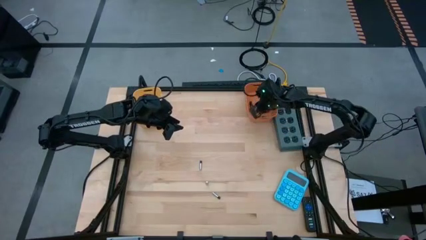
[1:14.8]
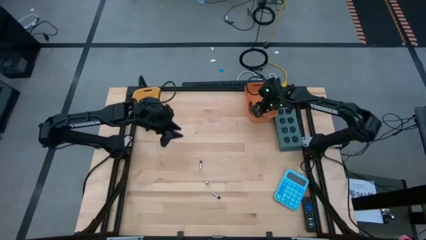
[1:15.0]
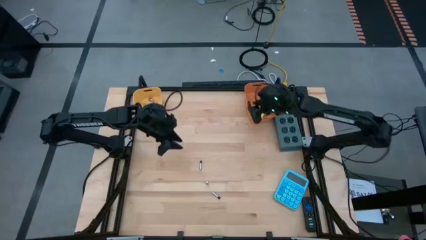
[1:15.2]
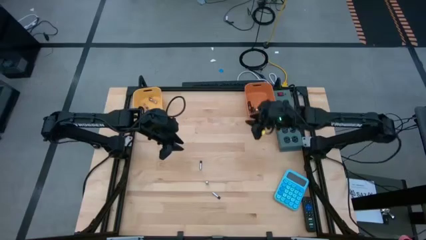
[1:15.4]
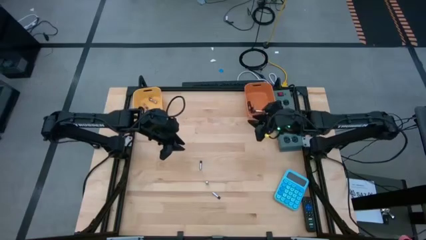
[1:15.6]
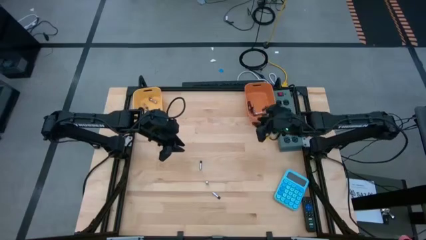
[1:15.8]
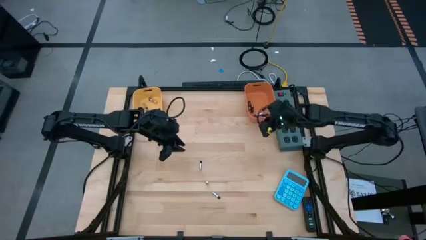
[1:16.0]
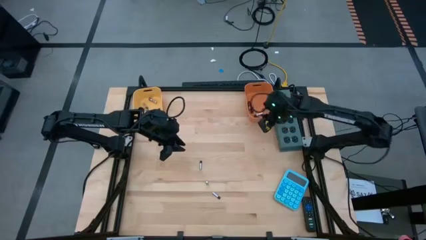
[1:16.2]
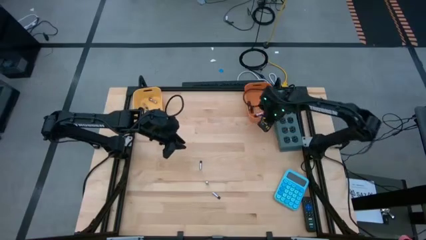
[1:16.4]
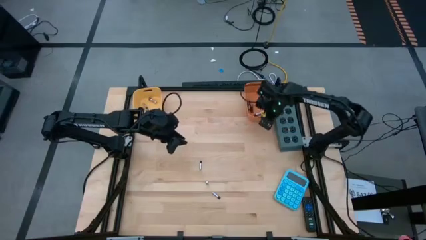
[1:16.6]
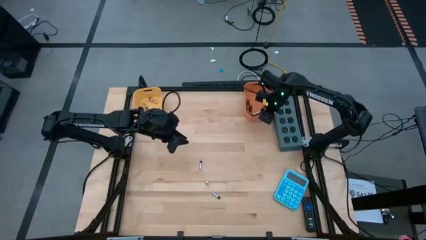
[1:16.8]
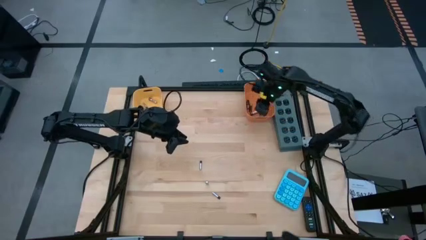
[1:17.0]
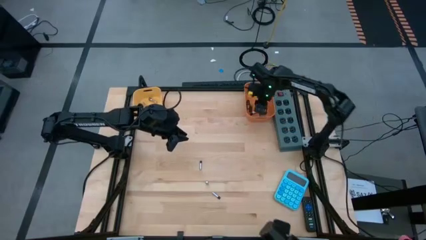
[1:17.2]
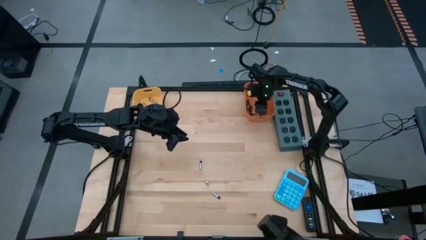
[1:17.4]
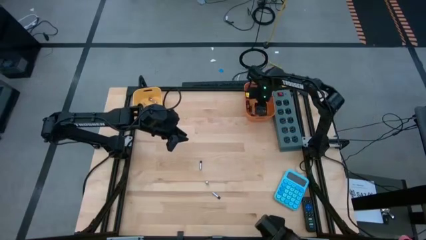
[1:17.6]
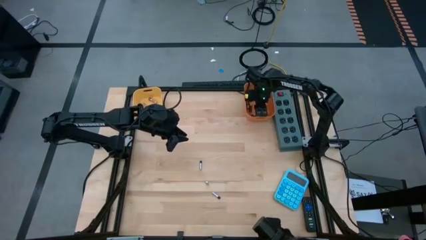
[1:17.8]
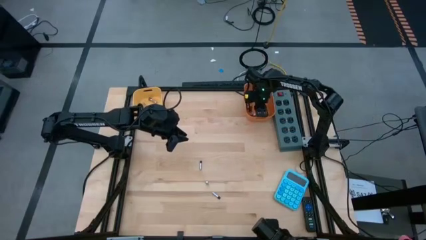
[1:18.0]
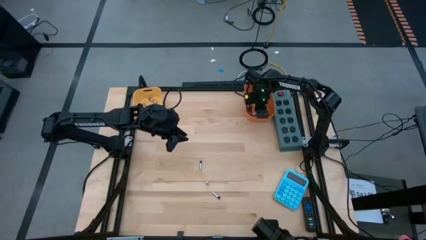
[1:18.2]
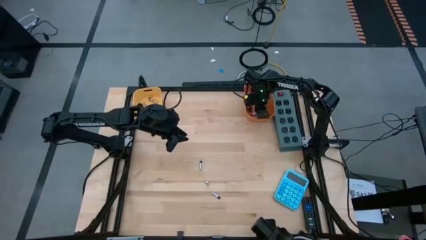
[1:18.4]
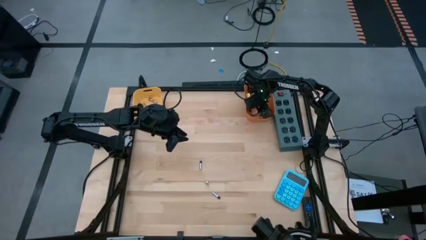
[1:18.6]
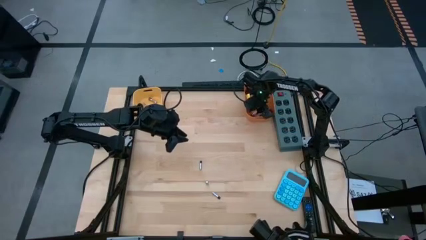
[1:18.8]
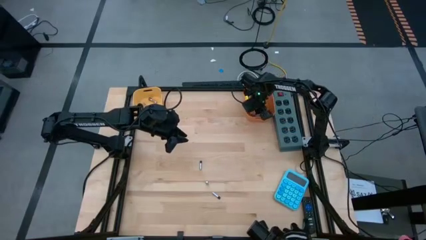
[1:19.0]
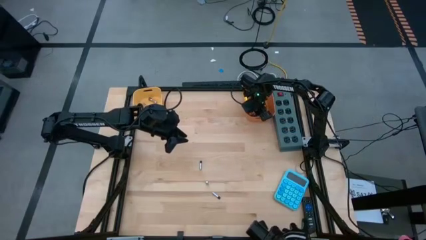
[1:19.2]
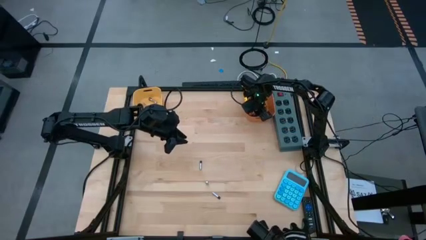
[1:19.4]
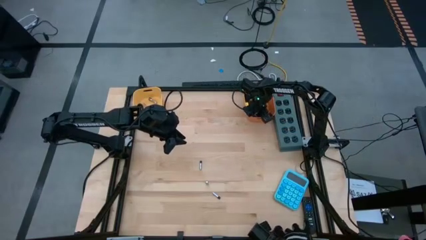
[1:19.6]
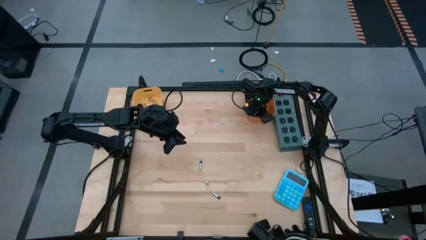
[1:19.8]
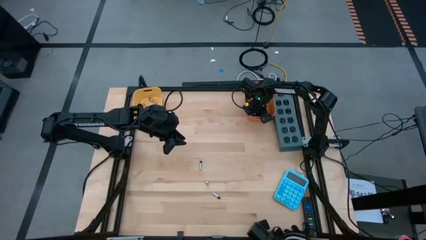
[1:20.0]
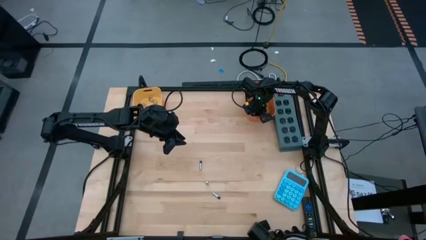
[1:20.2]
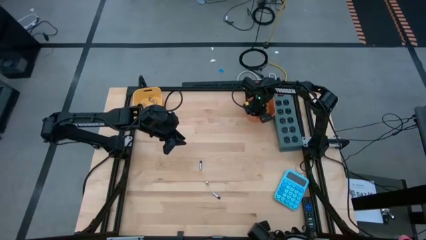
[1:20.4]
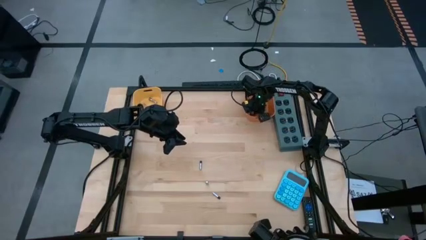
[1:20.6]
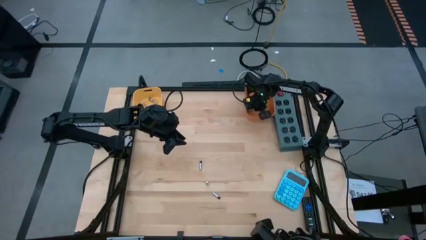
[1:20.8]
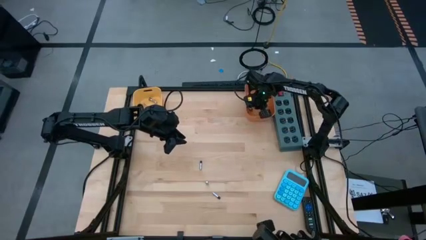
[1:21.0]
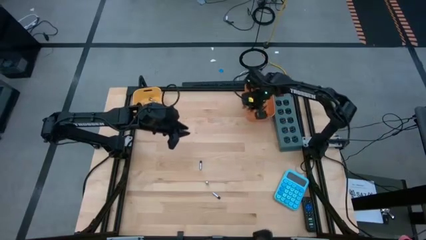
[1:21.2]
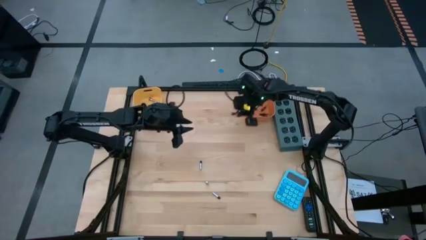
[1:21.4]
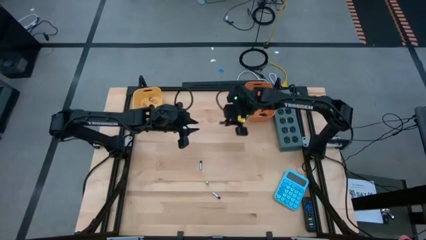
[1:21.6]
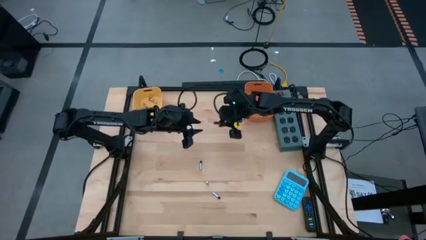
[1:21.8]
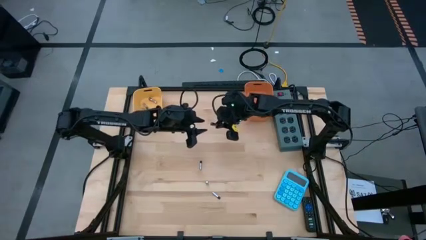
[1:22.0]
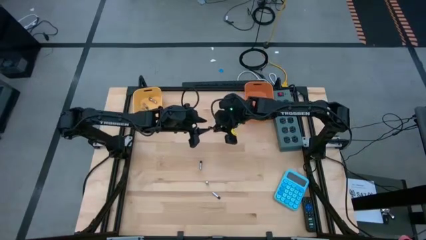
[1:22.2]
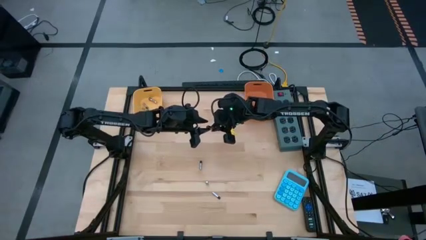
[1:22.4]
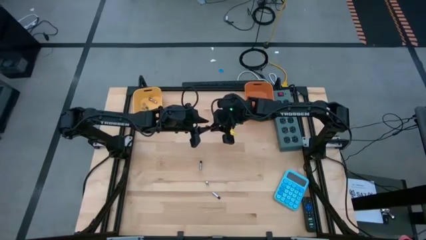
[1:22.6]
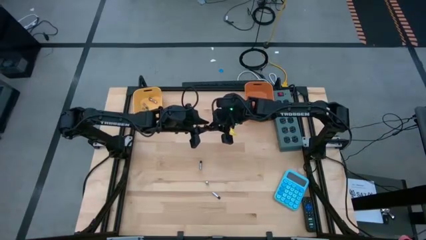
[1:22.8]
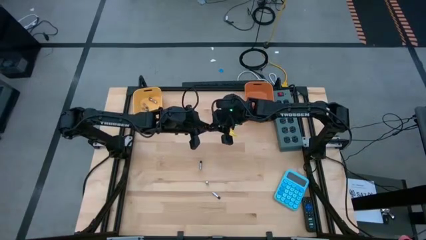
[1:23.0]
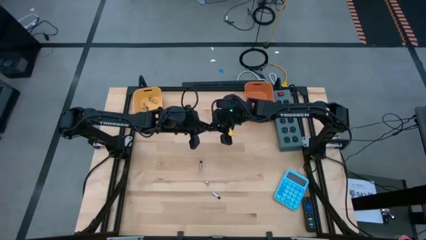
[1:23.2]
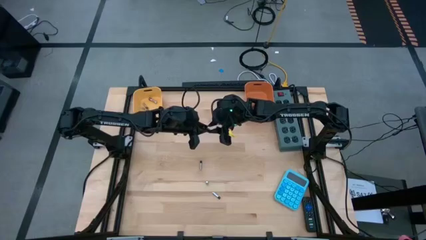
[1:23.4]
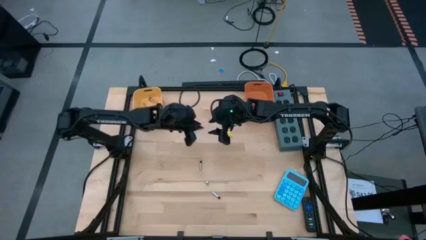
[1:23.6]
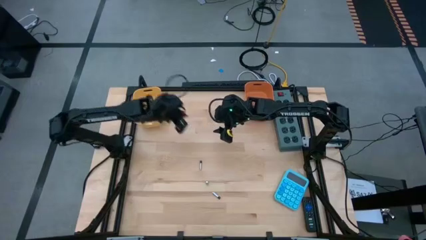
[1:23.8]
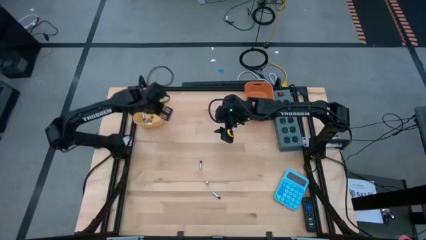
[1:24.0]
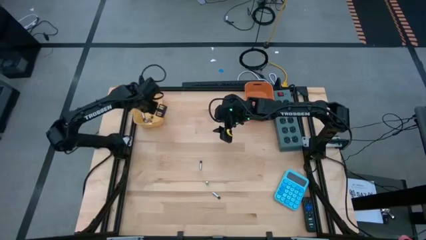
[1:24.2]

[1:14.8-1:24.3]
Task: Sort batteries
Put the silver battery into the yellow bin

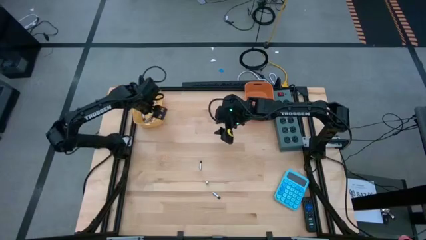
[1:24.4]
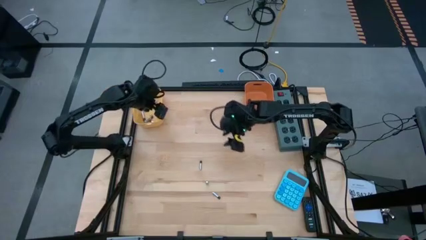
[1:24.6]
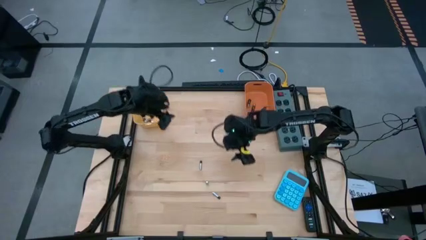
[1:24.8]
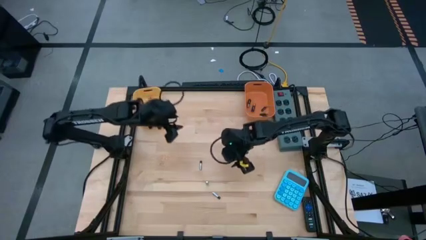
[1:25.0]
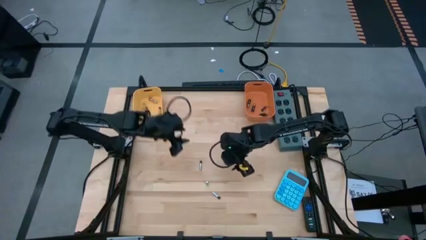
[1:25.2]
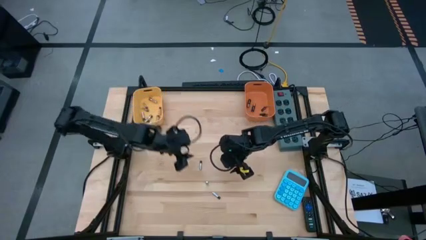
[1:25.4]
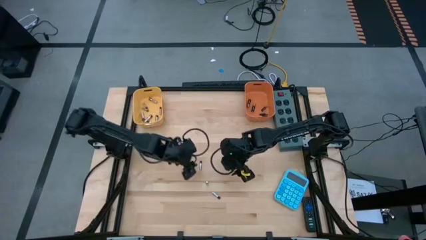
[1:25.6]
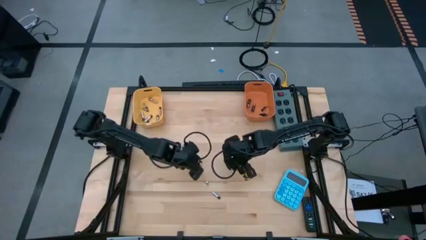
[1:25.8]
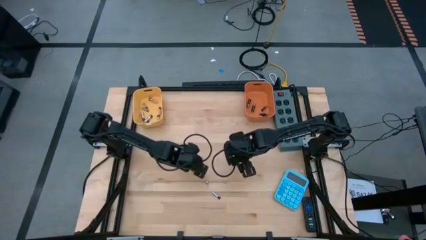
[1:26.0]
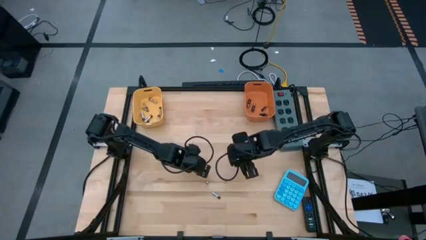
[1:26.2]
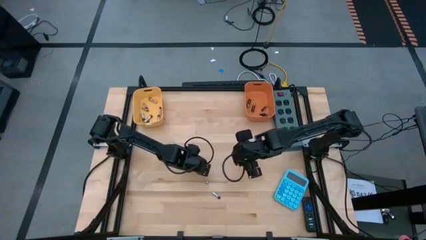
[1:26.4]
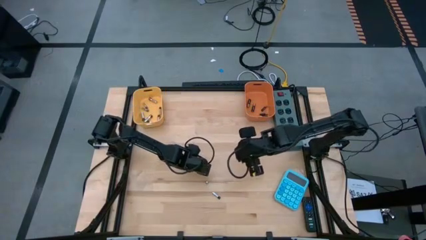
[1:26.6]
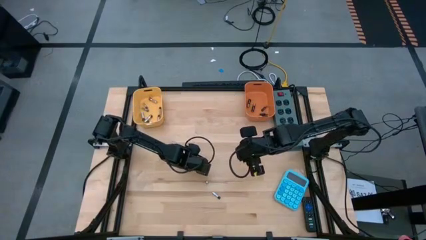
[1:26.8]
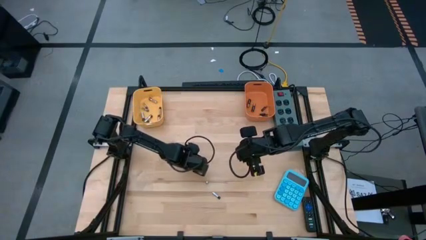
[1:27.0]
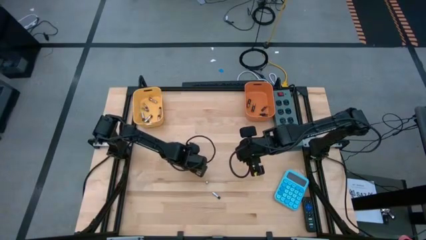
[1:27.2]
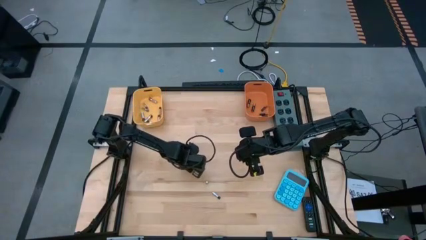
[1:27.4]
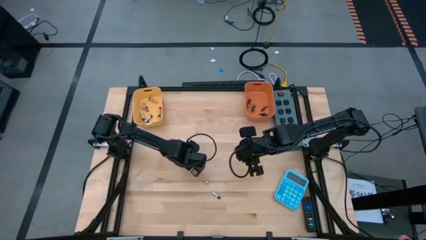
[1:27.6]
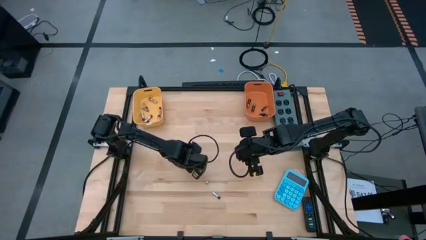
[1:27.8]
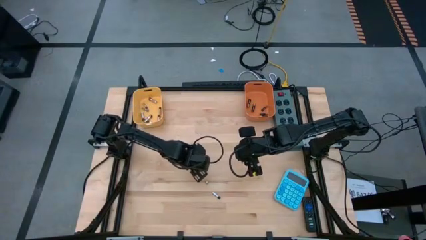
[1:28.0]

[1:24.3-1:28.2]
Put the silver battery into the yellow bin

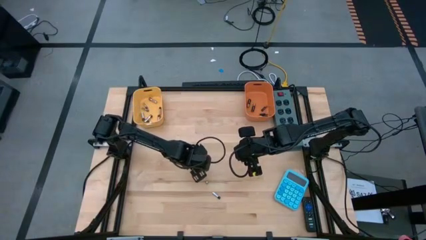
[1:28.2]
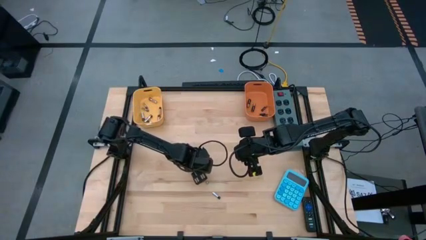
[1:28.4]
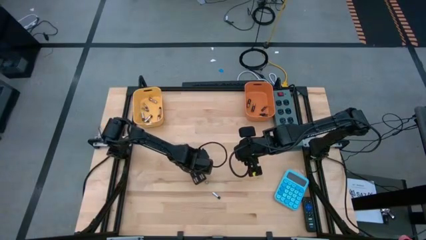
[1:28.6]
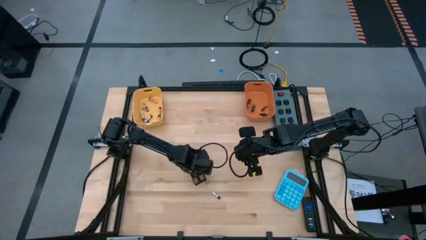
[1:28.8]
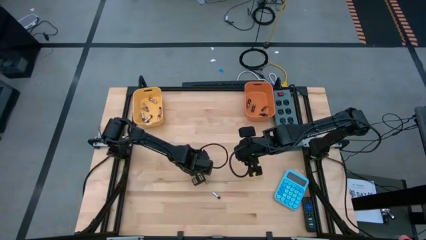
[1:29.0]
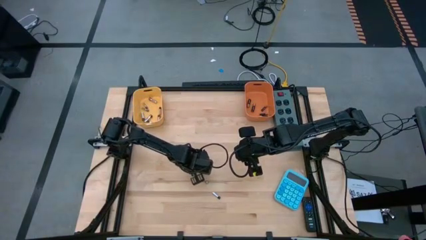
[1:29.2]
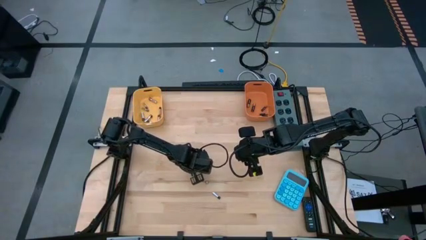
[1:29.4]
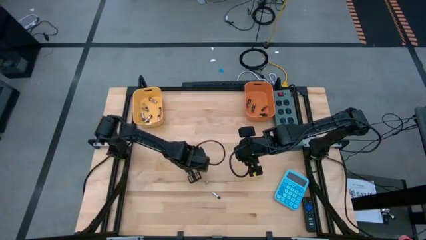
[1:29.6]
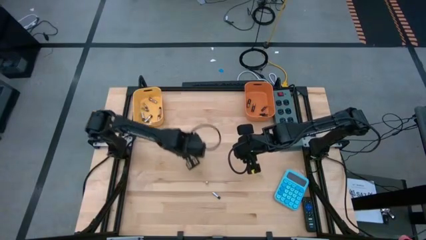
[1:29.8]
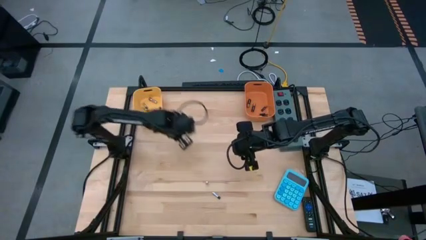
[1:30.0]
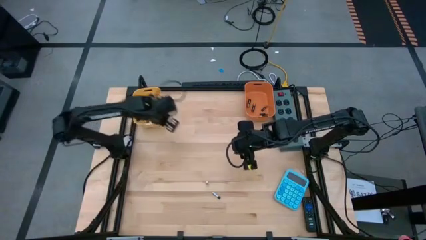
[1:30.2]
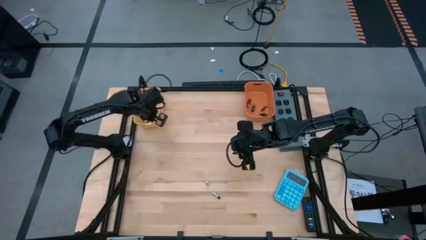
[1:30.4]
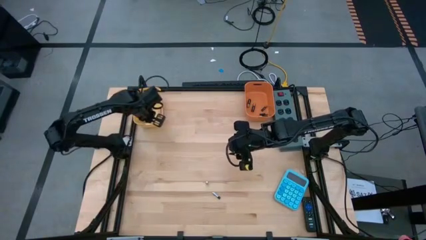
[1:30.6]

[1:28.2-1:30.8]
Put the silver battery into the yellow bin
